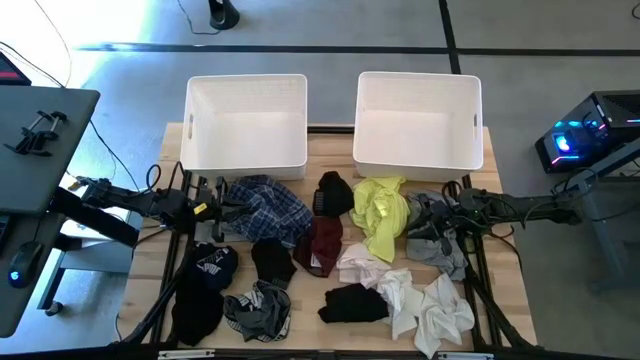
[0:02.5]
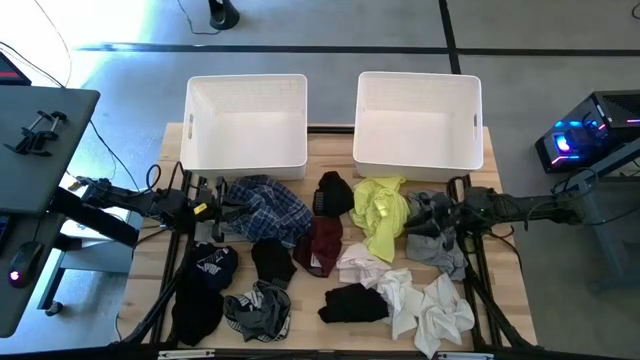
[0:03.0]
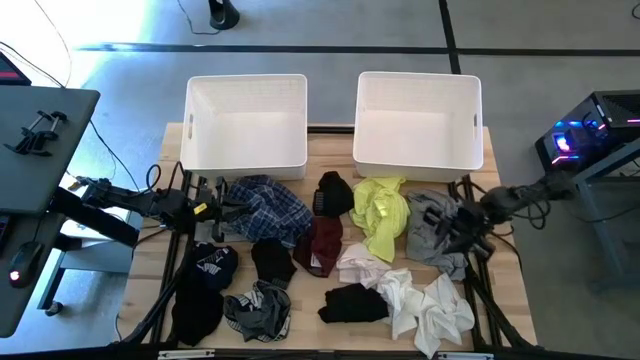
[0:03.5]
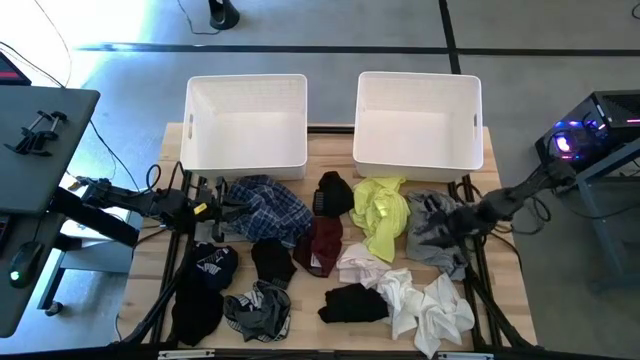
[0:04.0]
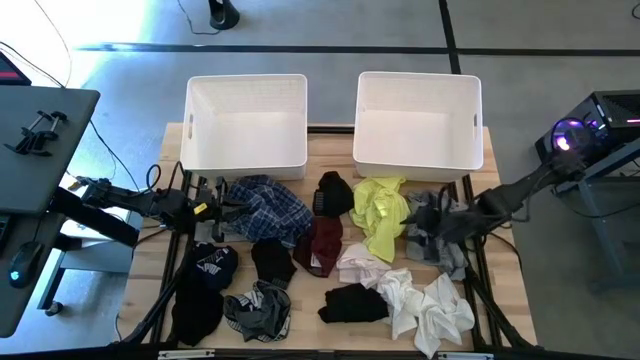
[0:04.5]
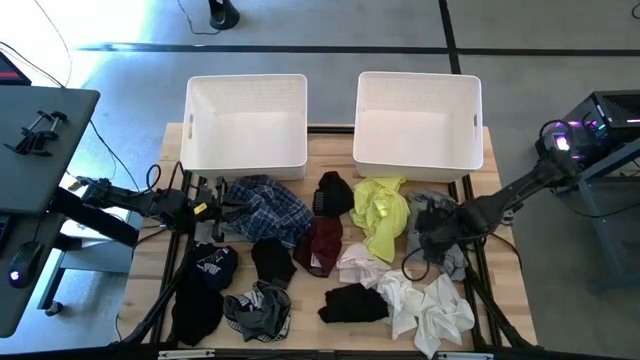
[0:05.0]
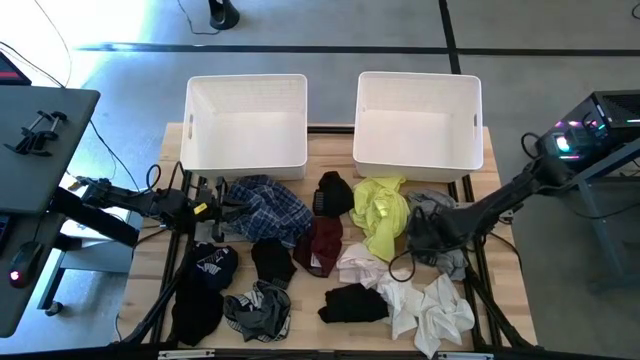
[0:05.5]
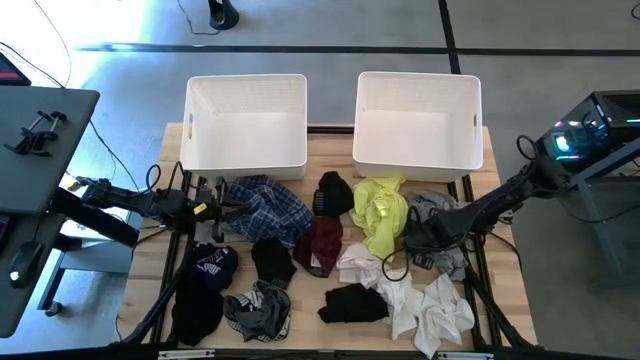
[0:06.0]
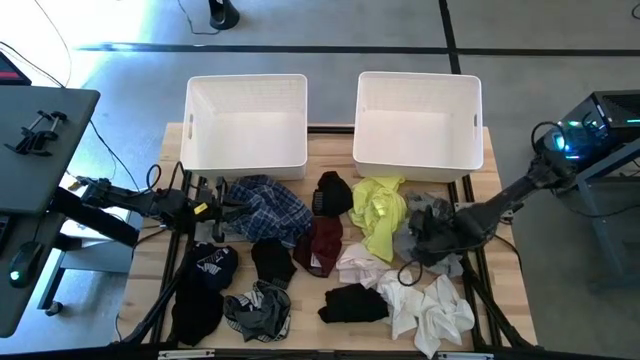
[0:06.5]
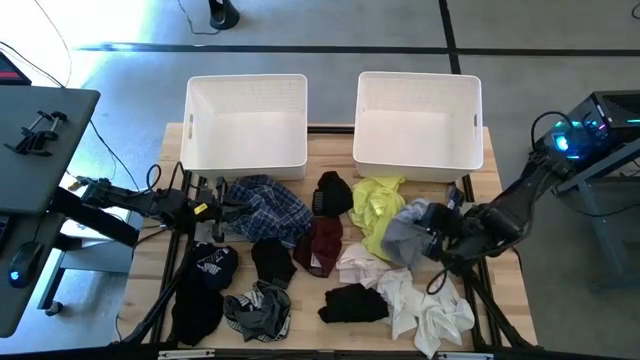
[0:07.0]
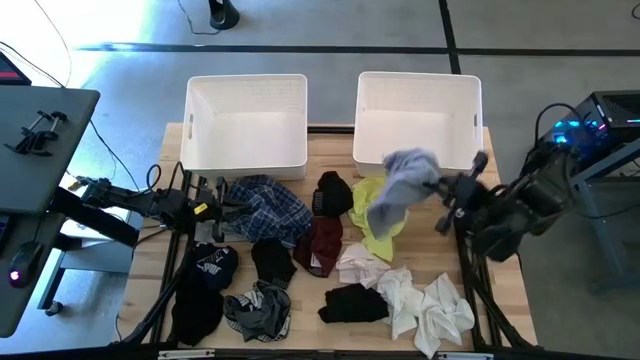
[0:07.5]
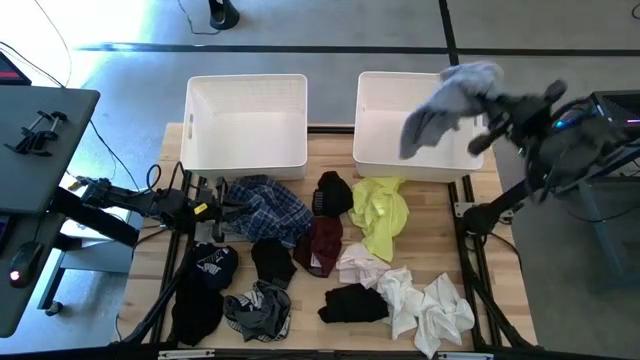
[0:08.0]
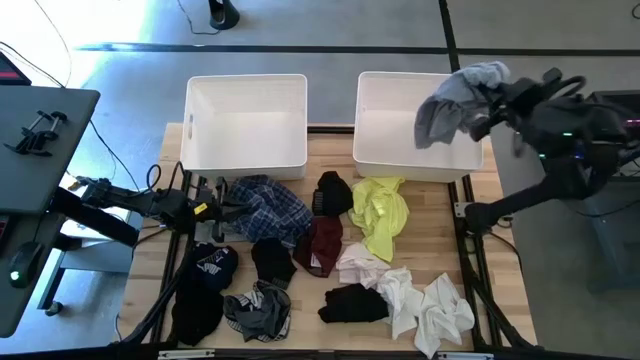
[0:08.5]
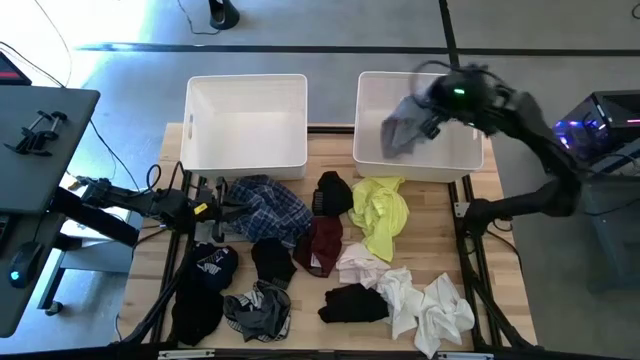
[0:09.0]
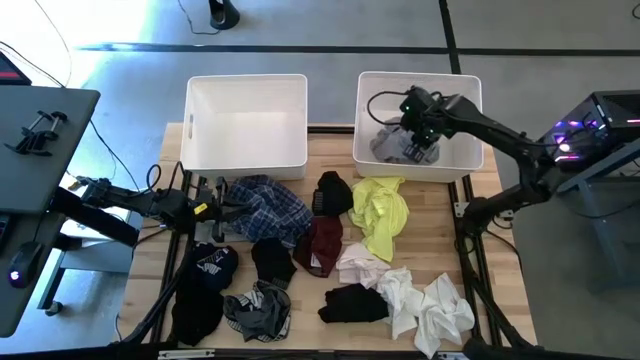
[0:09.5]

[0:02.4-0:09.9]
Task: Sort clothes
Put the gray shirt into the right white bin

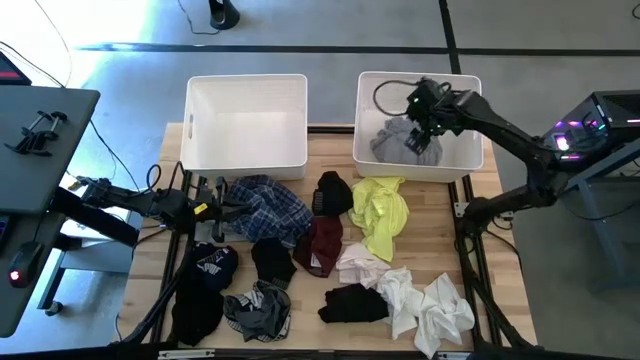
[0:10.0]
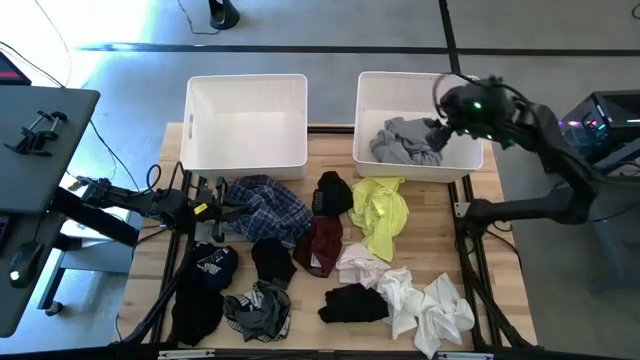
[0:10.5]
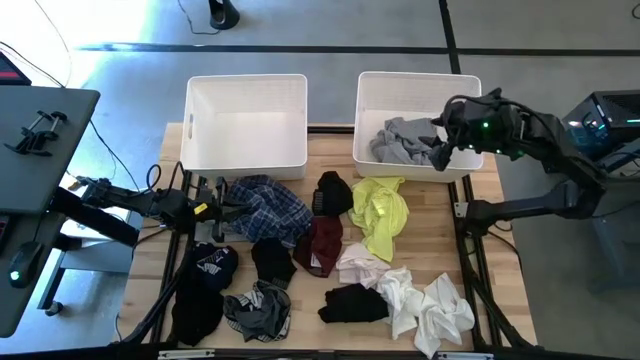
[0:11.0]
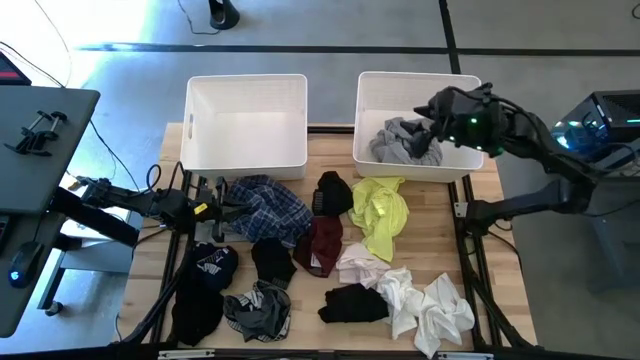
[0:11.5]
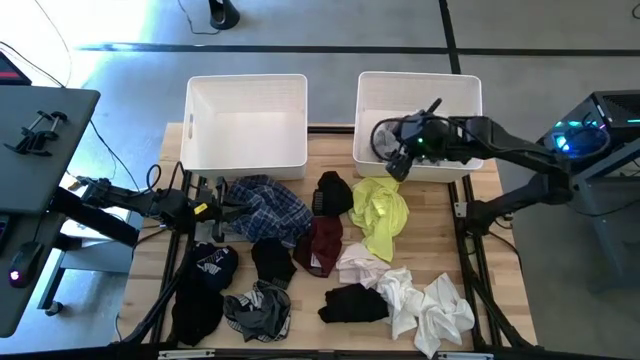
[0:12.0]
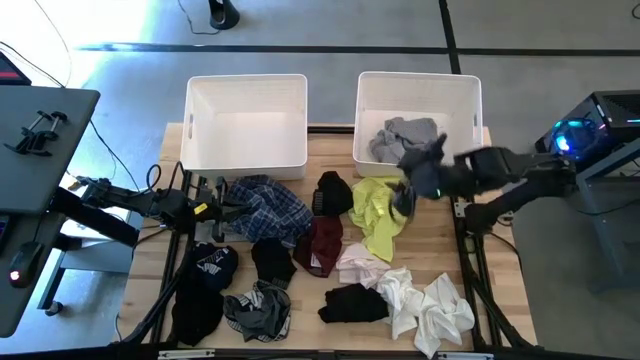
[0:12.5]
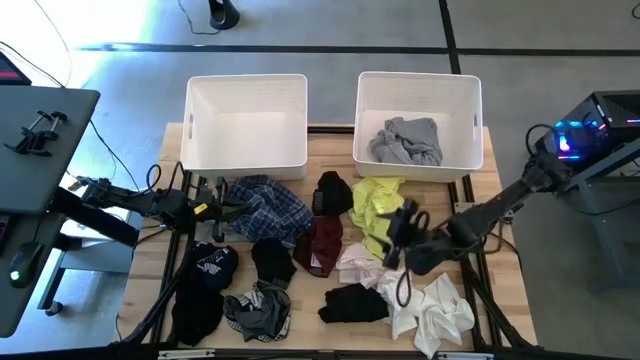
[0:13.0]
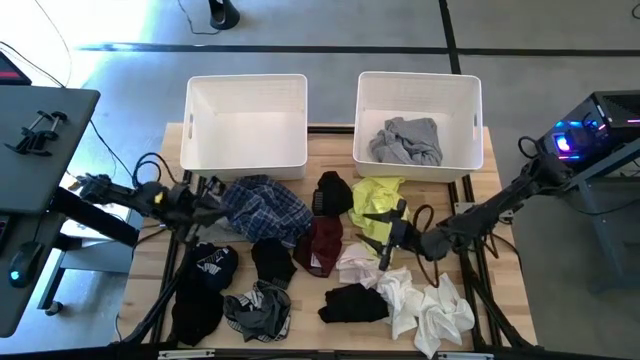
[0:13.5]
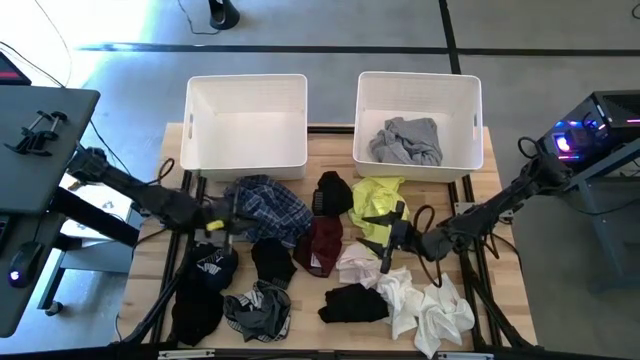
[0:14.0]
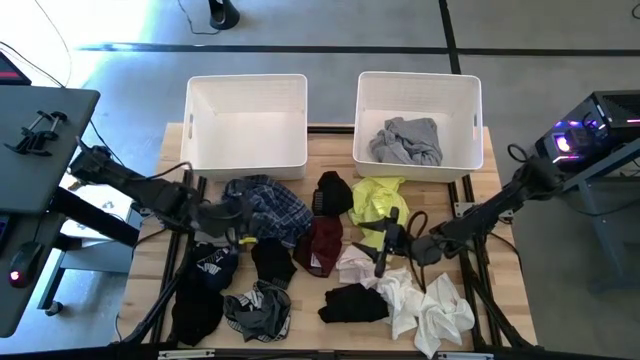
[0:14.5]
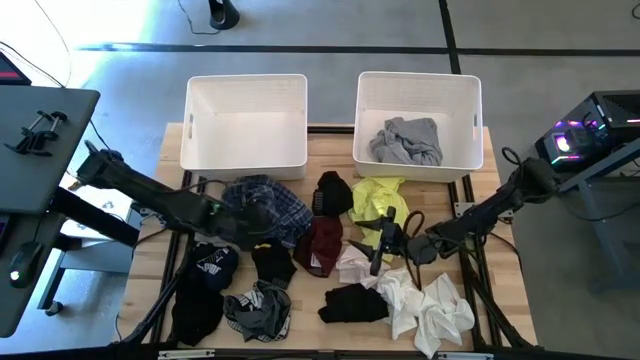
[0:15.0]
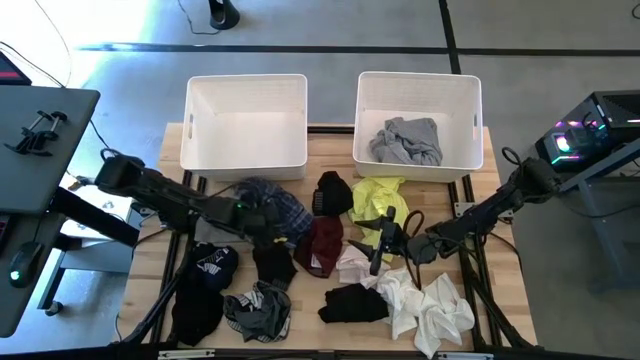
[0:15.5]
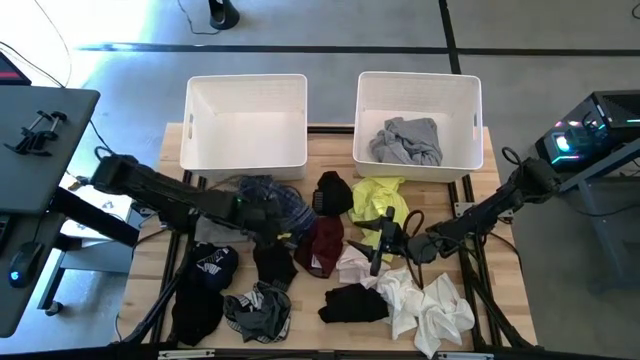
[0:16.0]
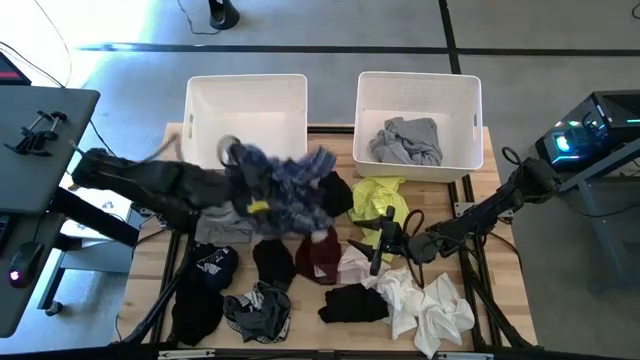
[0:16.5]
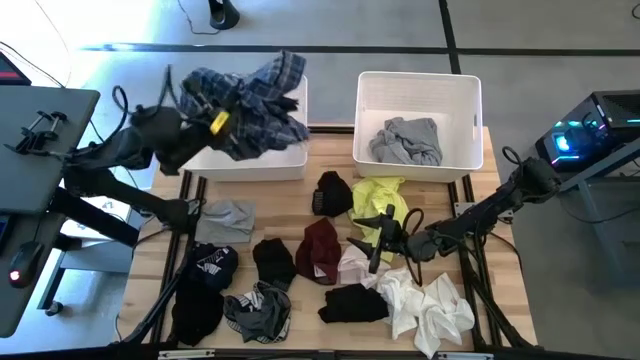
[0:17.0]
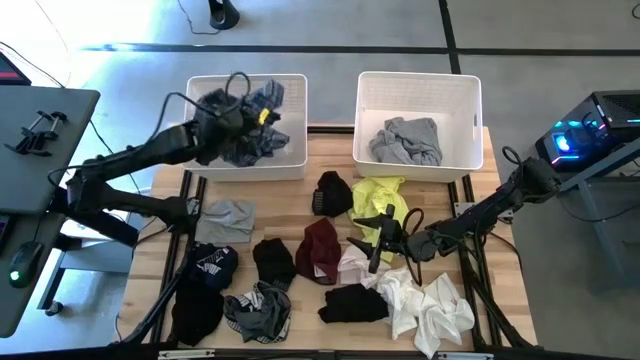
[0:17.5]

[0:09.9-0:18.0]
Put the blue shirt into the left white bin

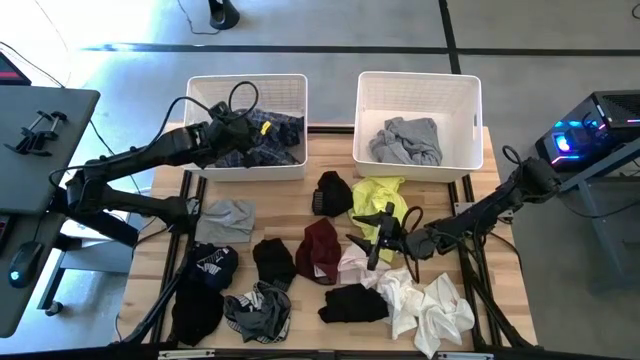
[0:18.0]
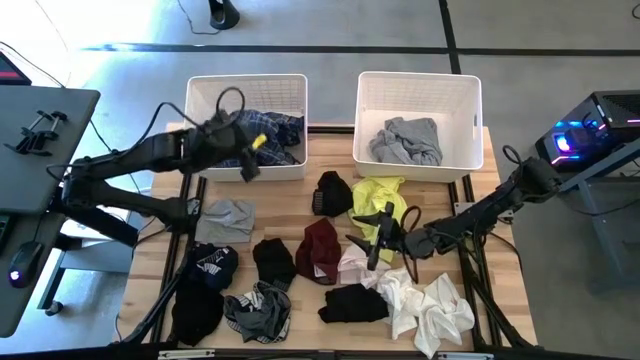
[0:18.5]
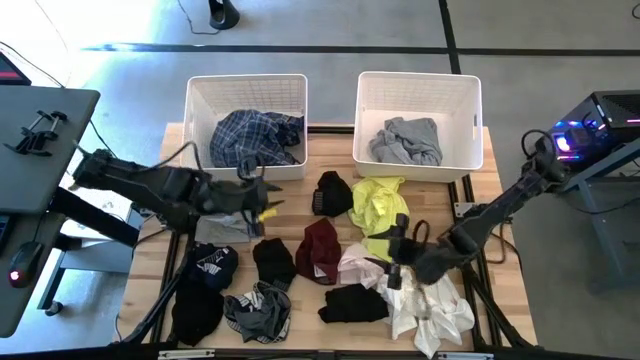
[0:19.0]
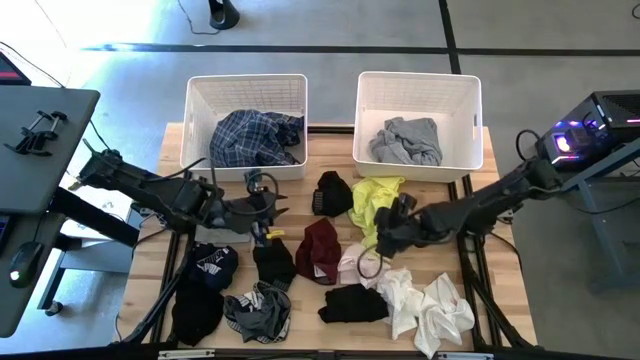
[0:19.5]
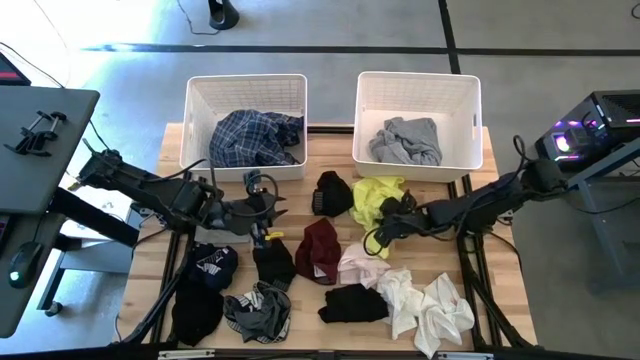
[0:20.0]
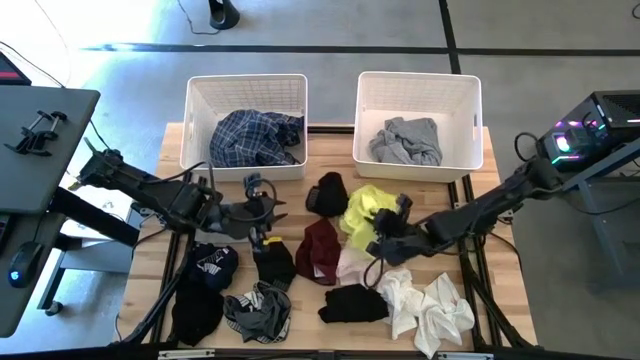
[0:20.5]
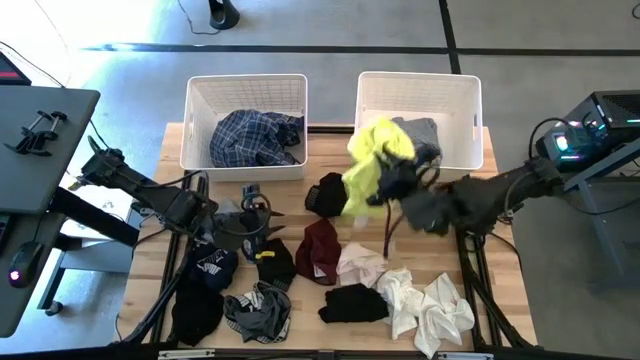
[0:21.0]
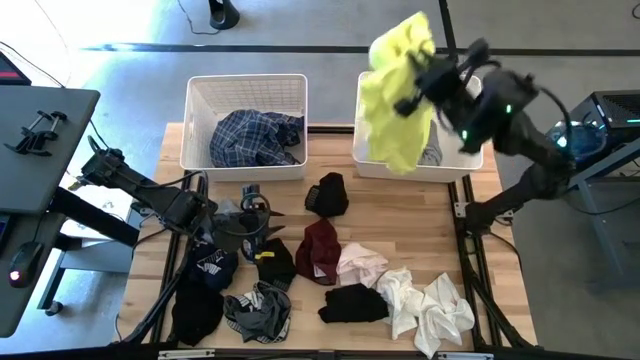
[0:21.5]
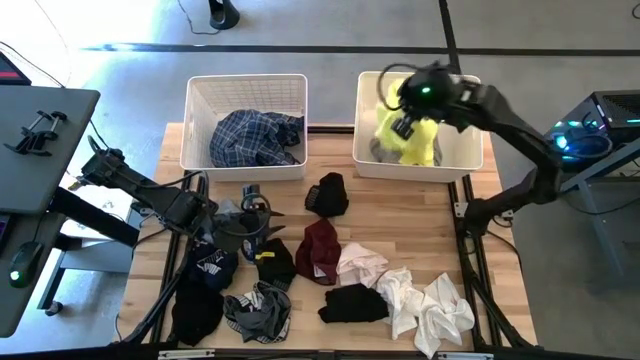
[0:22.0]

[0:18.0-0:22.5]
Put the yellow shirt into the right white bin

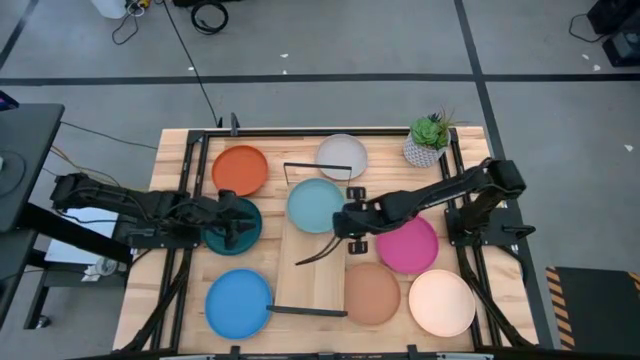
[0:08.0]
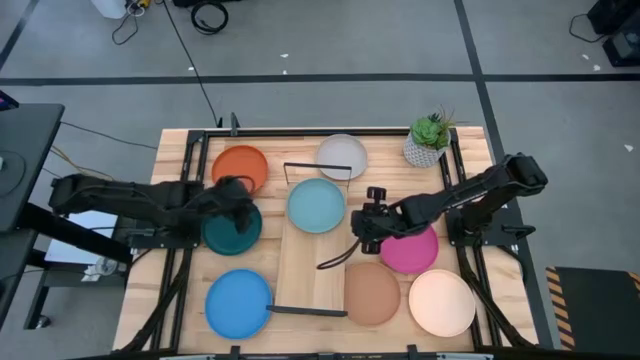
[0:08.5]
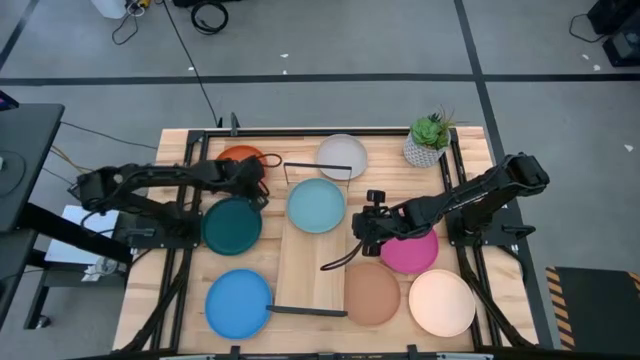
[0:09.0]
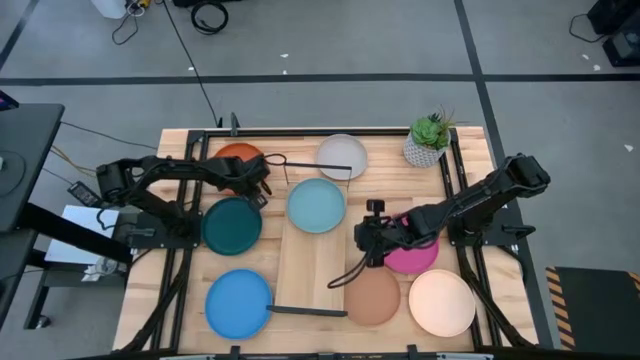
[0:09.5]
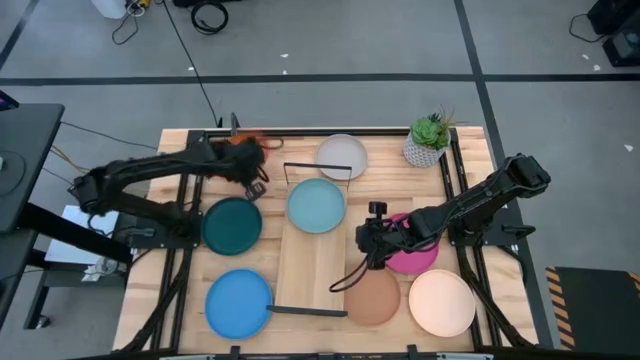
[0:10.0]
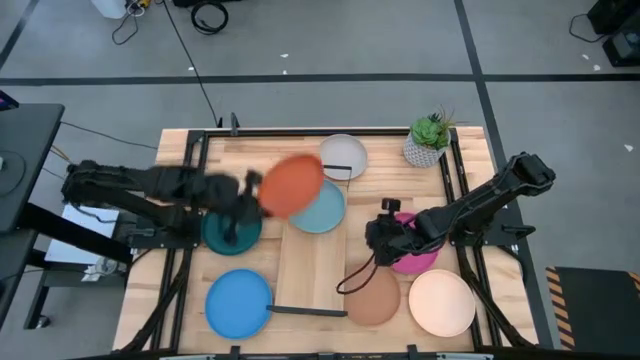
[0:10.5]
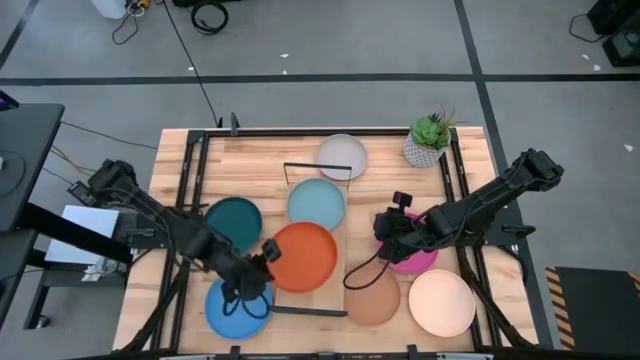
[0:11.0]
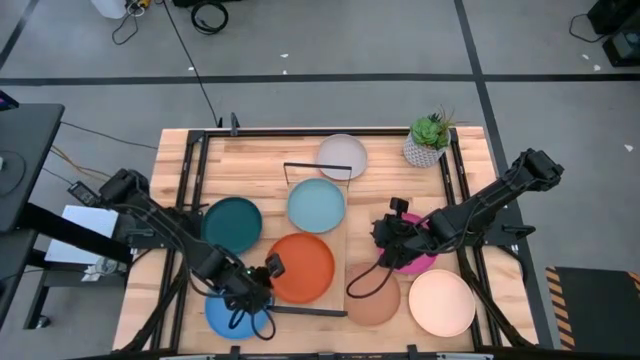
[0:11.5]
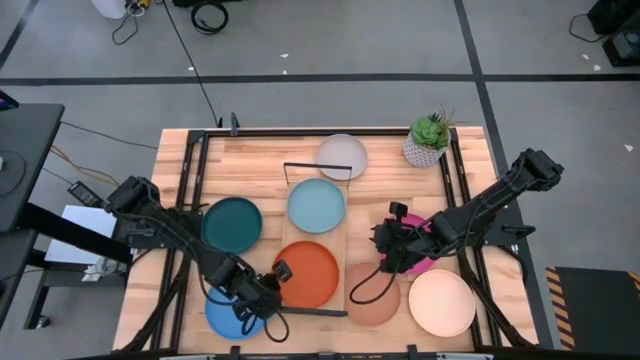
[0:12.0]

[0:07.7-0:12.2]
Task: Place and stack plates onto a shelf
Put the orange plate on the shelf
